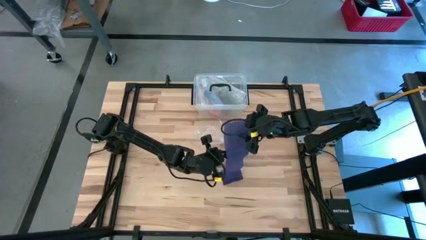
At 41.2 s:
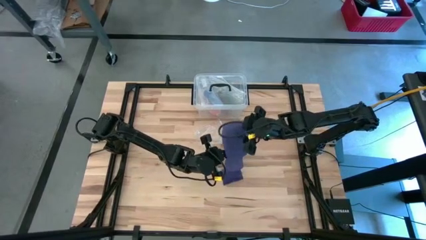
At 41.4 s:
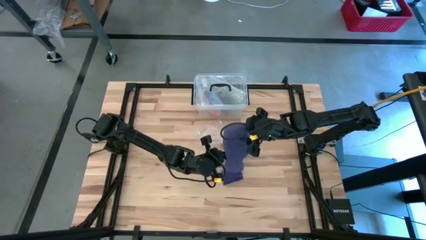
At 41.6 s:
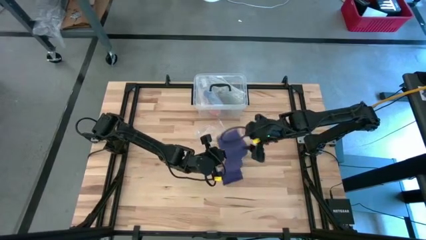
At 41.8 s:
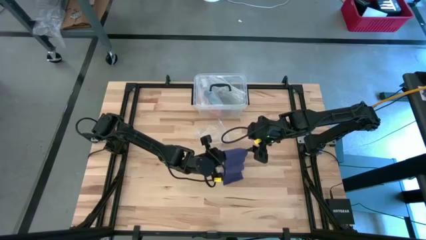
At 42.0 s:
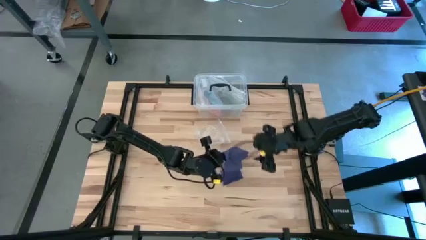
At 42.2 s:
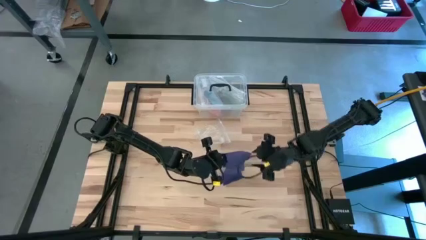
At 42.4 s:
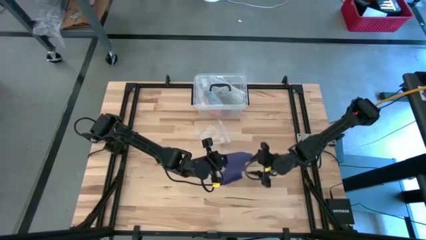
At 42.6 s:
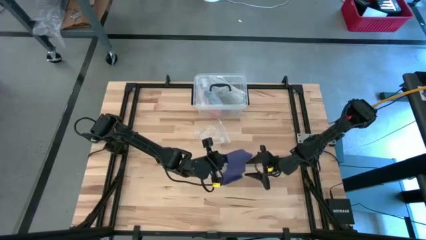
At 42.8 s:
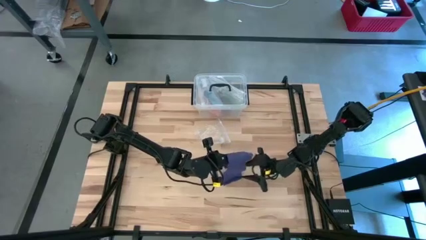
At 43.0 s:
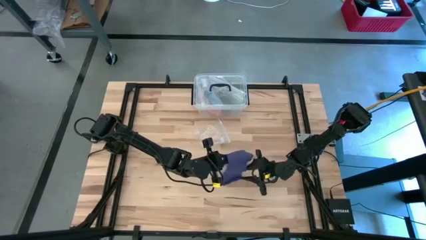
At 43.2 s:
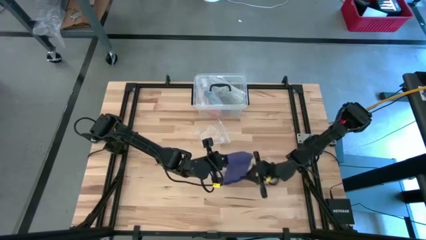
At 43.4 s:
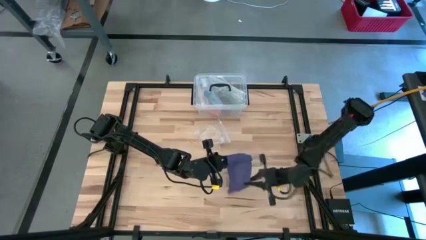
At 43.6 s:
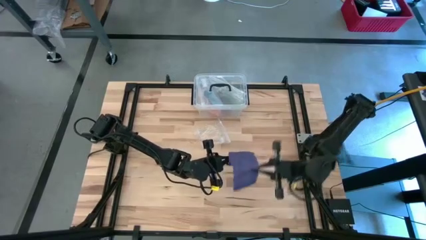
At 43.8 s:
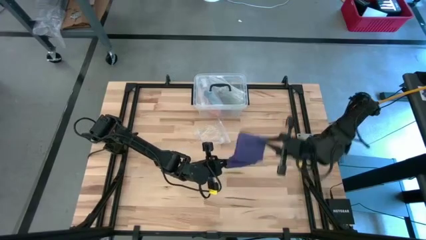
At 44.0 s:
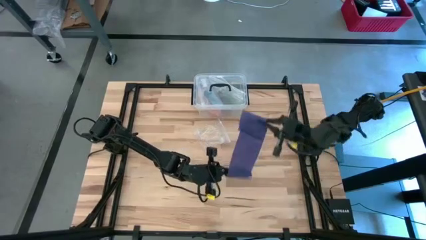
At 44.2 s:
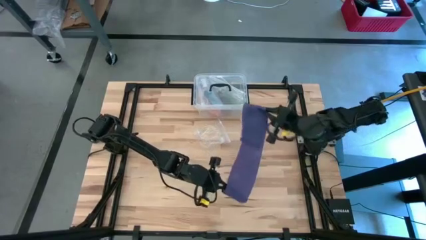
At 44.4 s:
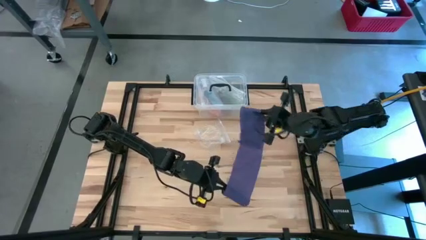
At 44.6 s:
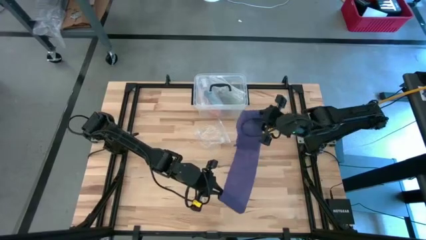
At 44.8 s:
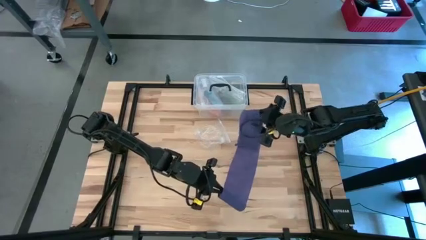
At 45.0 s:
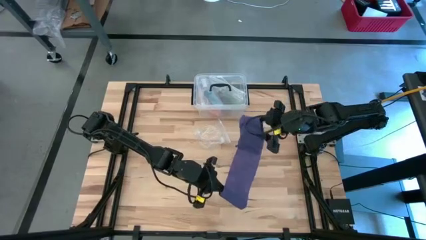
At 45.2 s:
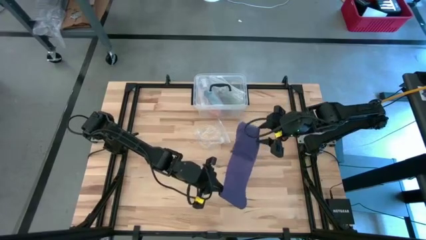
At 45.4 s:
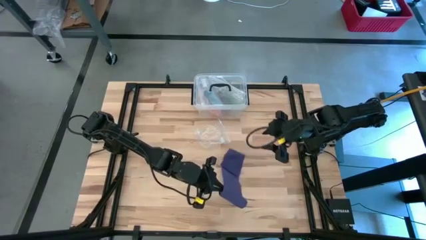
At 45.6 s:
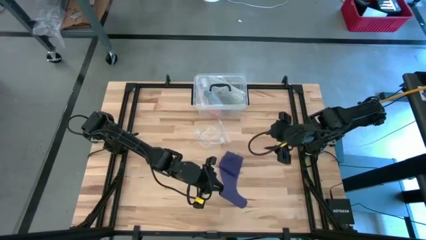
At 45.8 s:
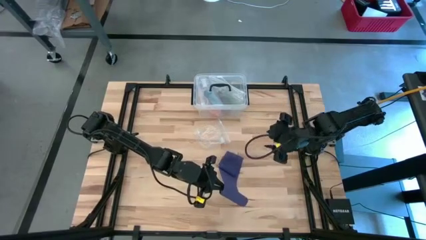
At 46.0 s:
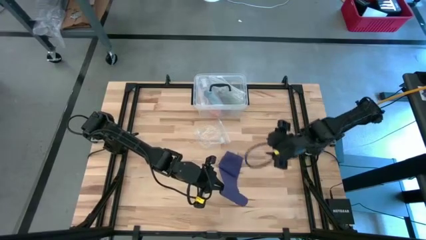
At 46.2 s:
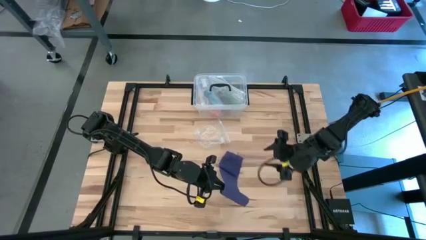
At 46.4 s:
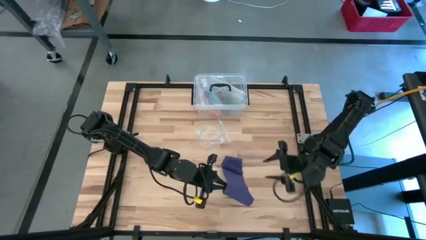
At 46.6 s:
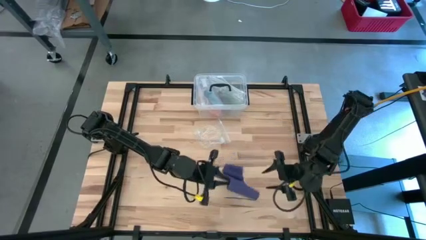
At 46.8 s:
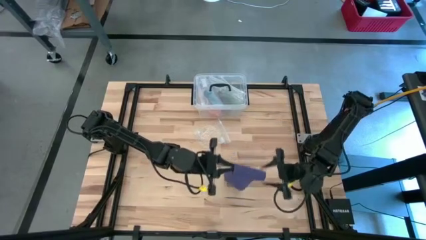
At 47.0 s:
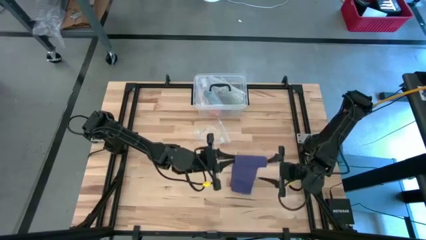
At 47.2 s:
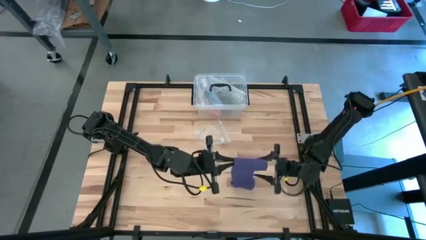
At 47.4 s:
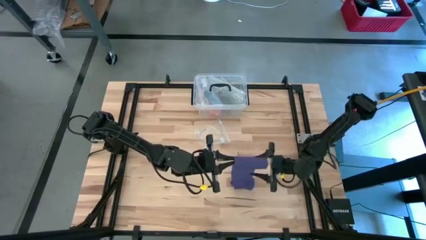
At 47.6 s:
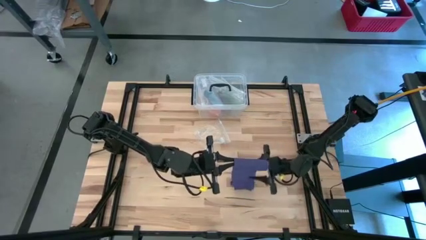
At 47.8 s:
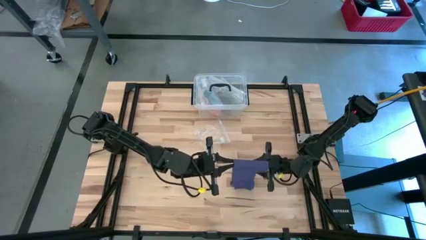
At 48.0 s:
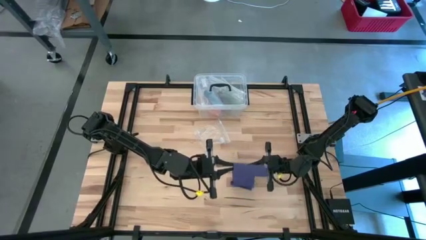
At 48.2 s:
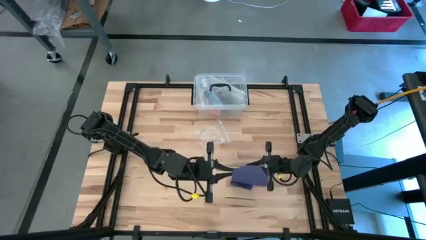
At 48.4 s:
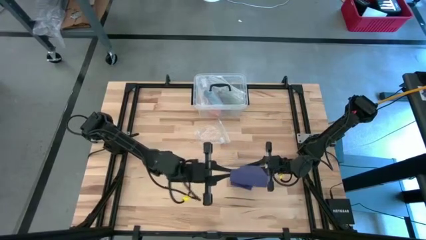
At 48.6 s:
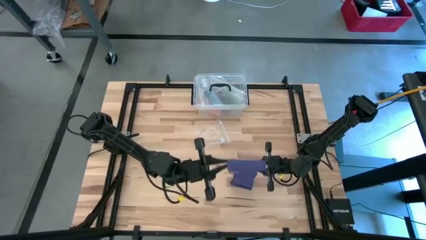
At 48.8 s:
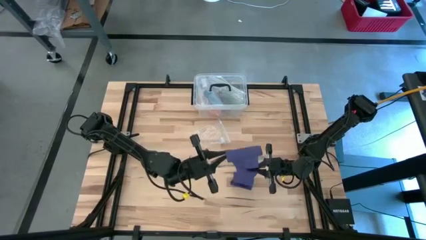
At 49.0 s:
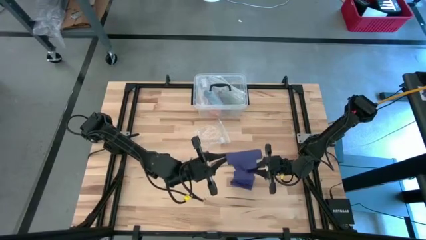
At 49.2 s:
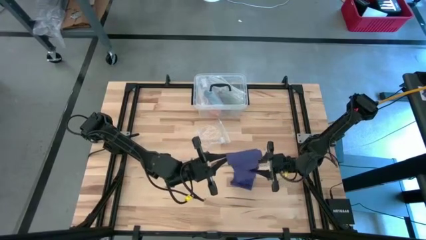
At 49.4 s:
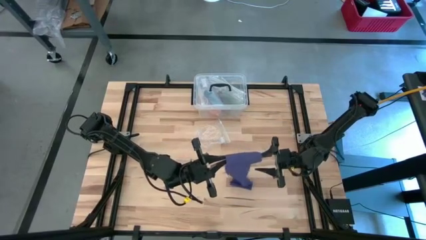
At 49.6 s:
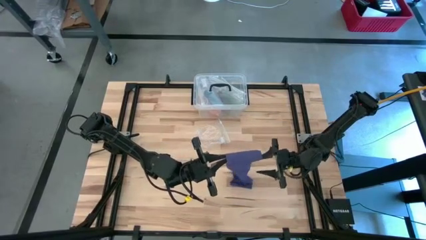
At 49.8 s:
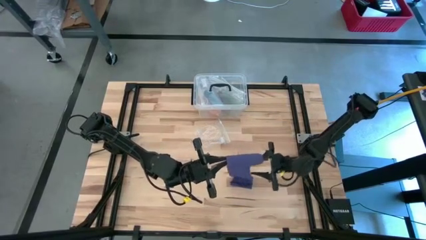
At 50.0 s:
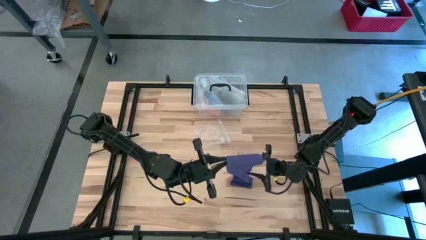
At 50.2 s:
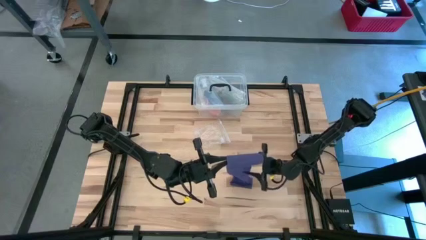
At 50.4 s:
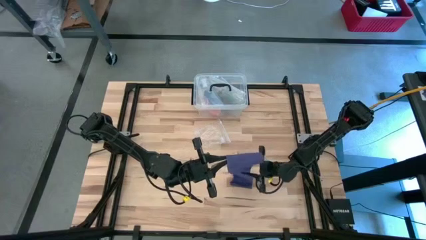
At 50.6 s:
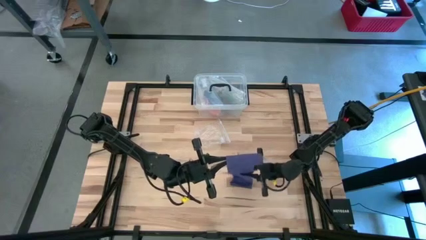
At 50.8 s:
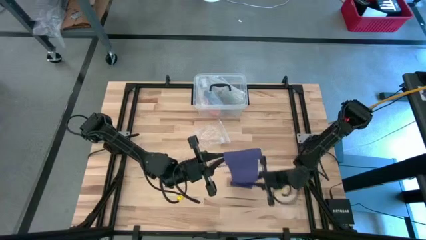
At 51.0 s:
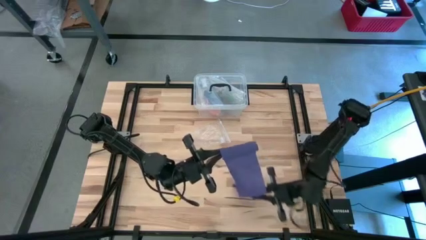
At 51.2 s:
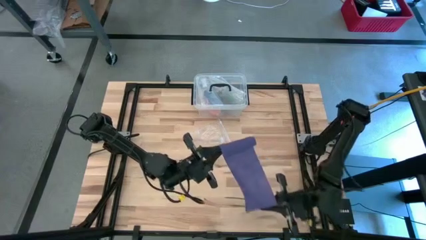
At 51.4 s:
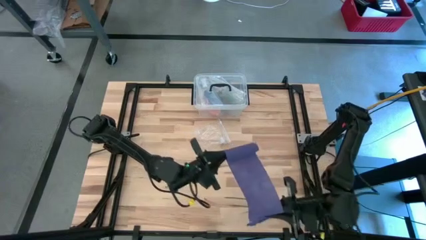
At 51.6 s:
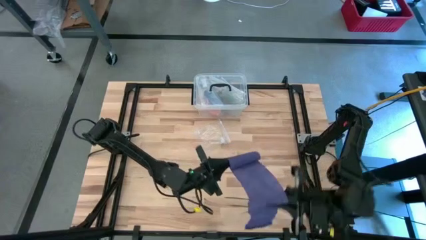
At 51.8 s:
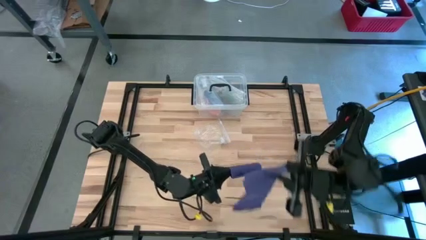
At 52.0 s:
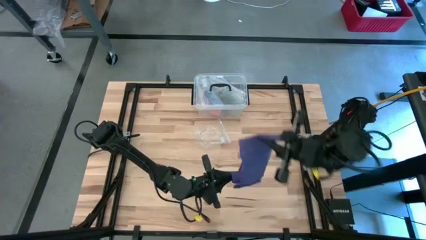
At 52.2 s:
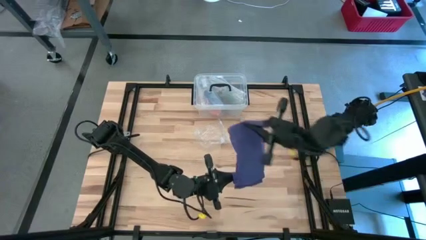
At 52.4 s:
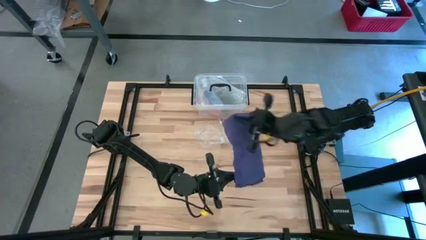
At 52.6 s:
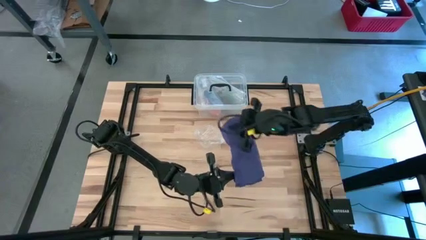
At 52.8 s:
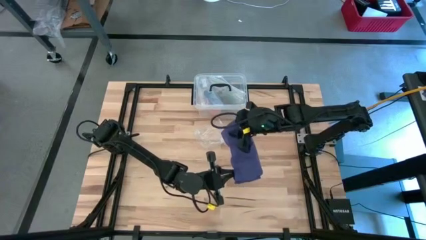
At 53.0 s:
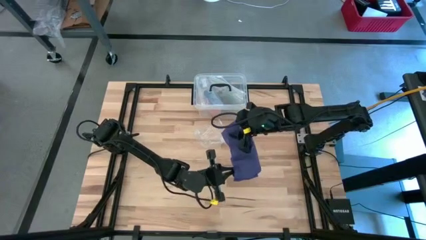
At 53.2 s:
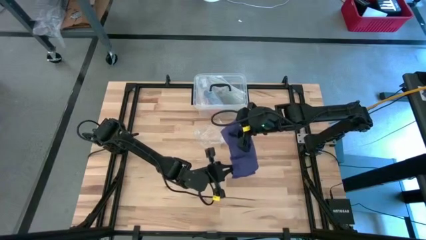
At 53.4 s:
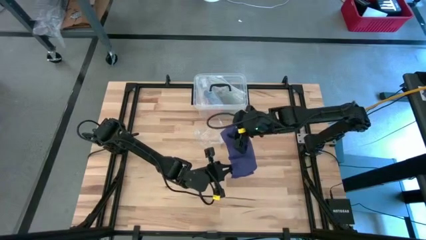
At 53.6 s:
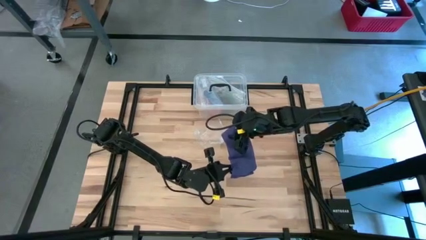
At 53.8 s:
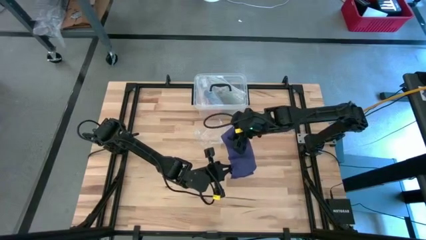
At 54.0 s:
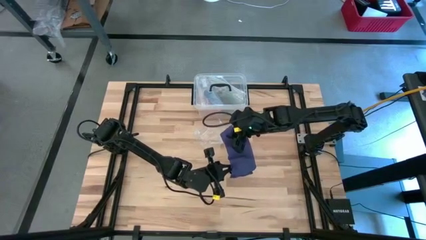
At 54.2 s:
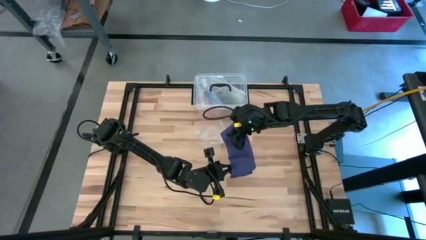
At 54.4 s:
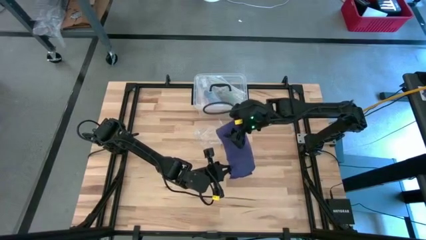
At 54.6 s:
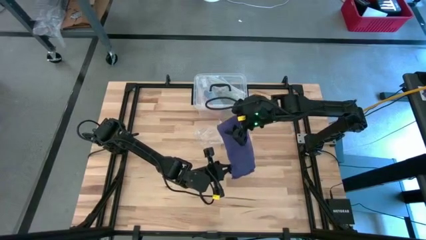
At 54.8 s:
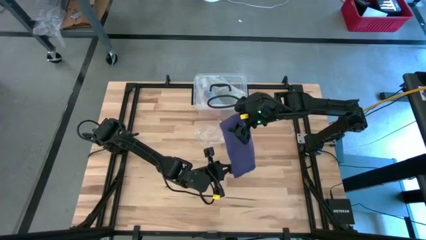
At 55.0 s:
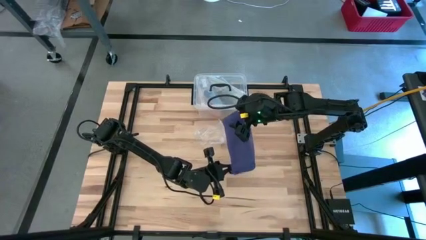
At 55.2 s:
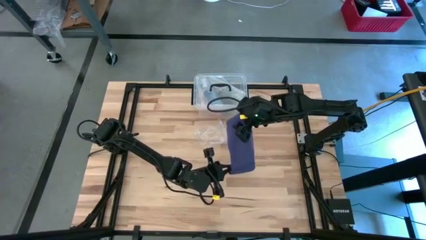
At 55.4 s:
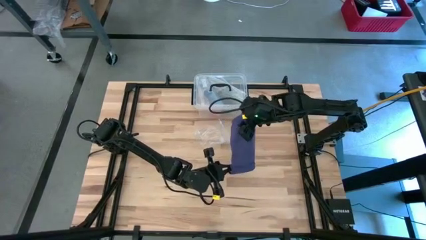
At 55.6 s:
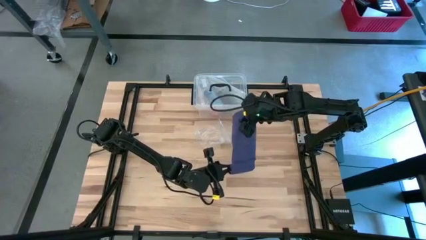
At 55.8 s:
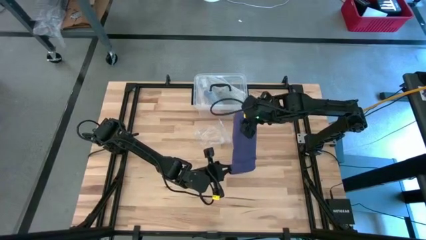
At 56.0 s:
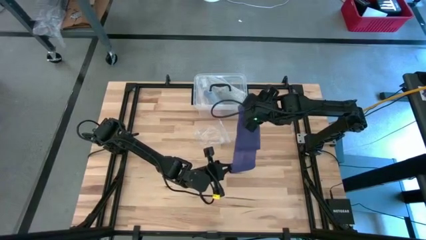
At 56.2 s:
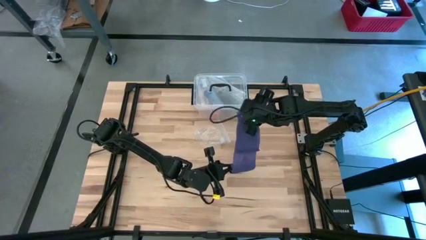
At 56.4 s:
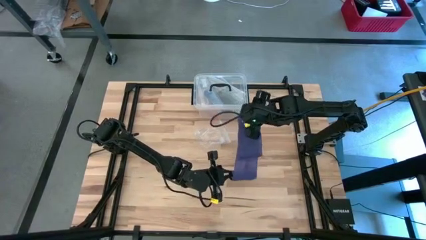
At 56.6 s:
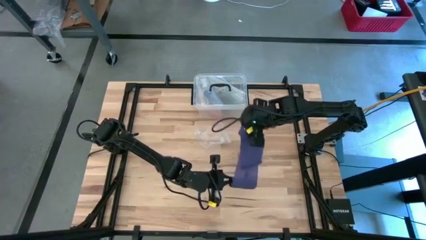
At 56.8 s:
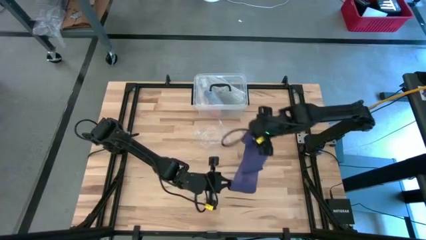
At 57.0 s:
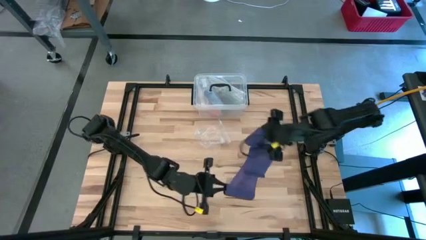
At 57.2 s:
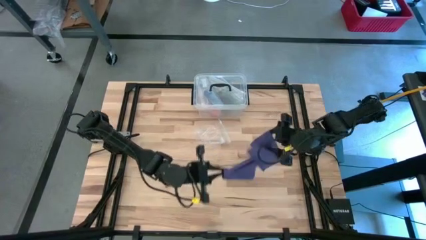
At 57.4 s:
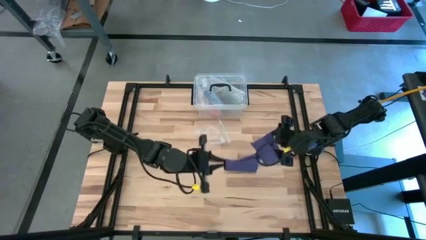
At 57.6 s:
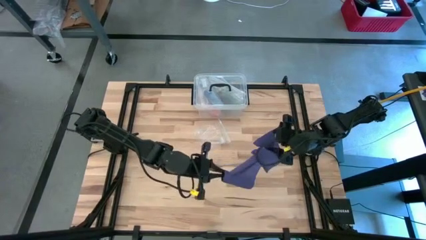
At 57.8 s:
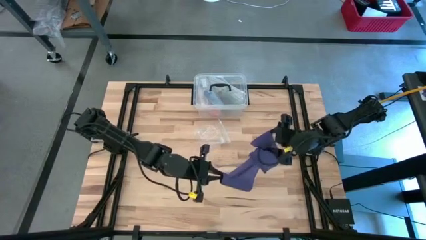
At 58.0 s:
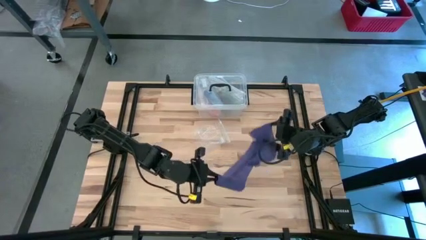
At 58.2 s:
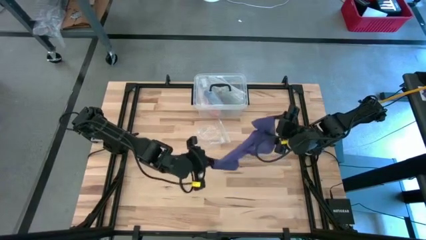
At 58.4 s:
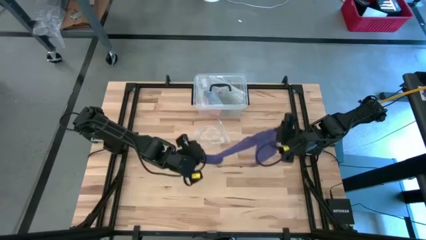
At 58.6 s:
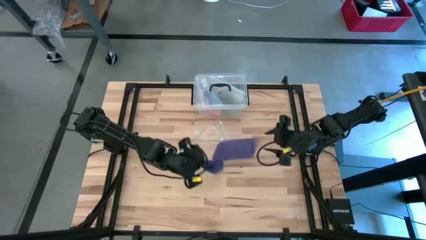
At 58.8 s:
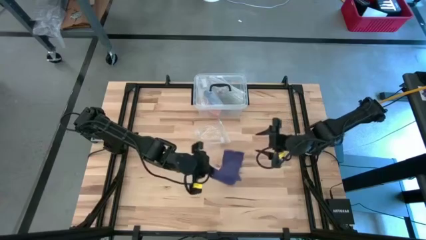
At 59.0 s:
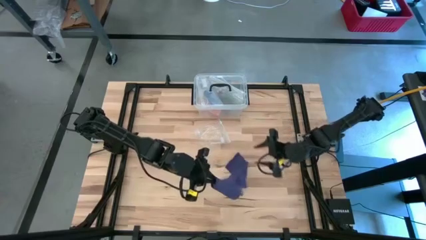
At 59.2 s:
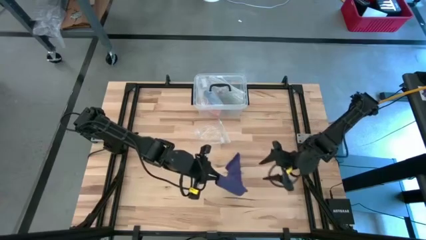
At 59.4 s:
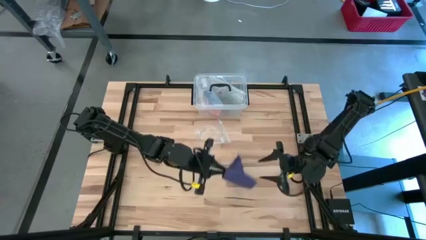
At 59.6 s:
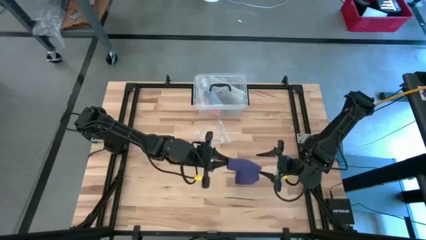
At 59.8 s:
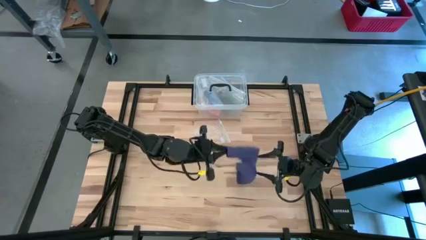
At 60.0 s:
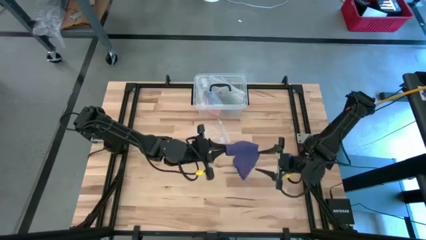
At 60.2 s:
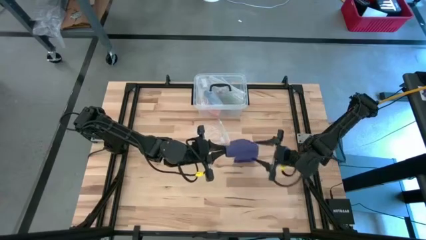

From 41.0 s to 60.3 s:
Task: Roll bandage
Roll the blue bandage
